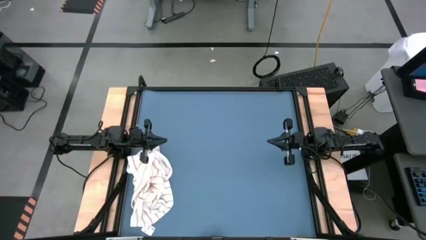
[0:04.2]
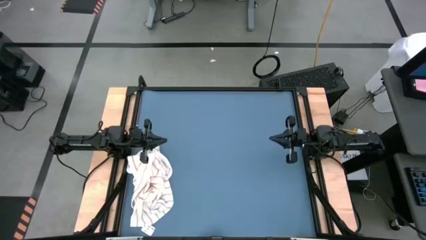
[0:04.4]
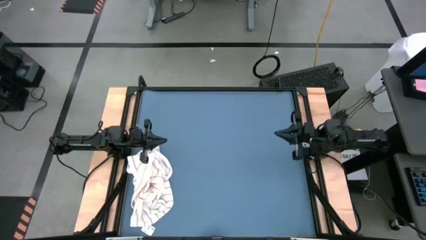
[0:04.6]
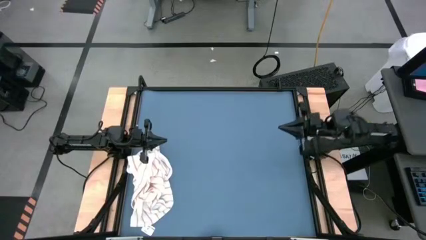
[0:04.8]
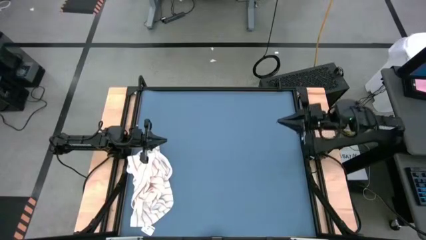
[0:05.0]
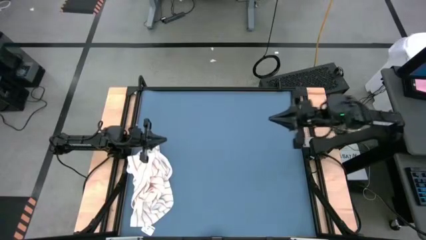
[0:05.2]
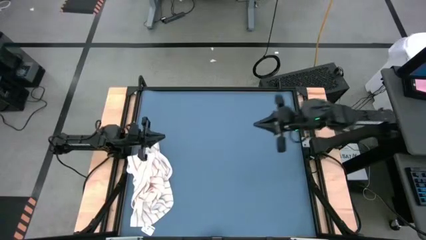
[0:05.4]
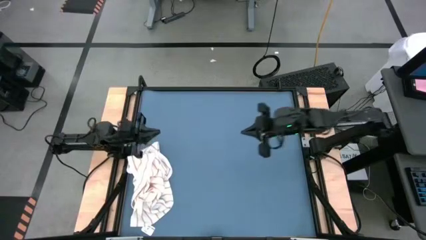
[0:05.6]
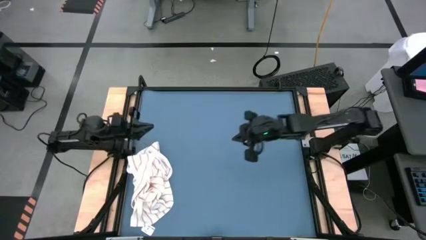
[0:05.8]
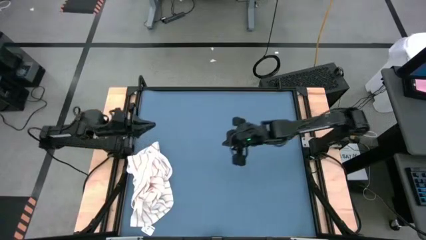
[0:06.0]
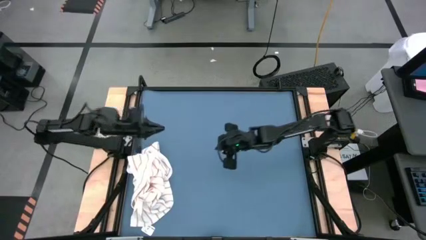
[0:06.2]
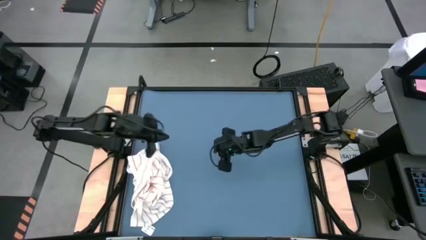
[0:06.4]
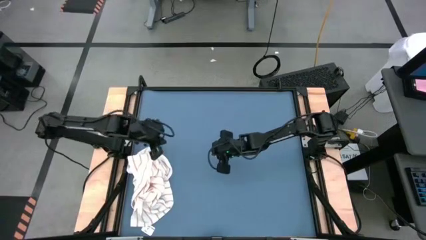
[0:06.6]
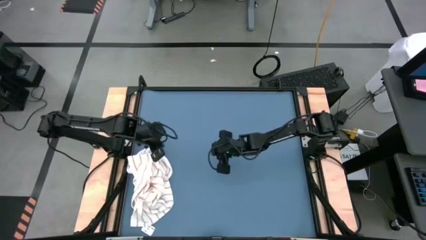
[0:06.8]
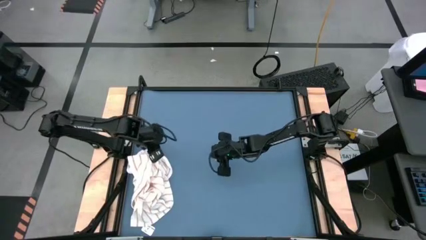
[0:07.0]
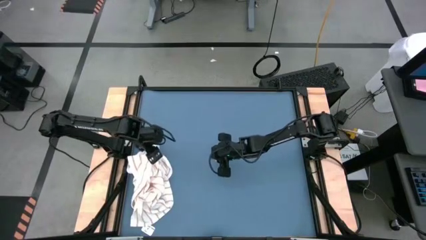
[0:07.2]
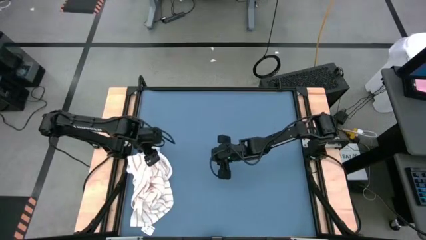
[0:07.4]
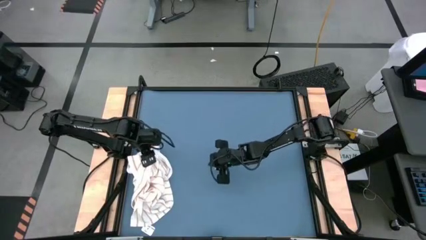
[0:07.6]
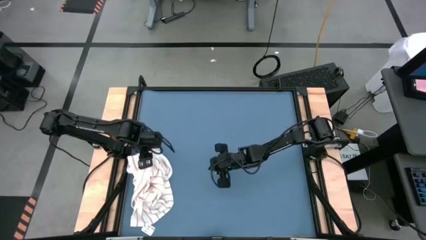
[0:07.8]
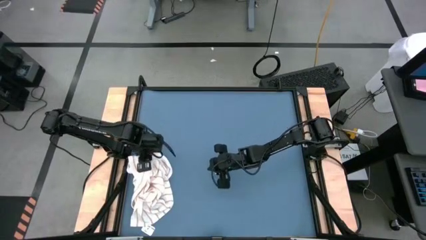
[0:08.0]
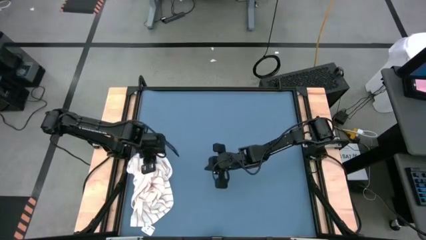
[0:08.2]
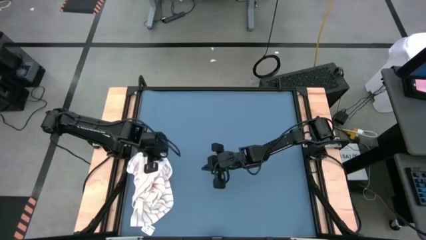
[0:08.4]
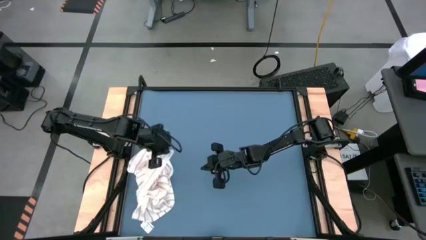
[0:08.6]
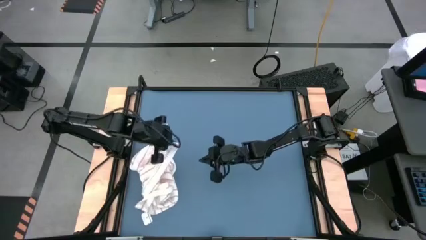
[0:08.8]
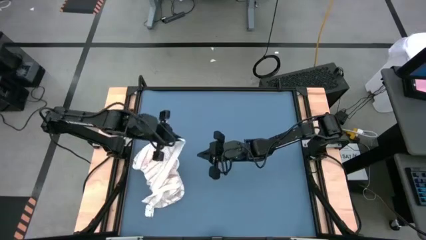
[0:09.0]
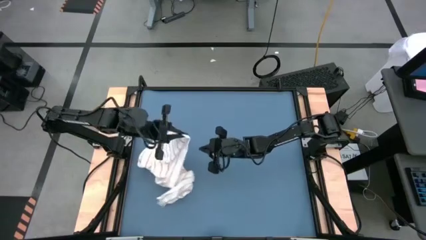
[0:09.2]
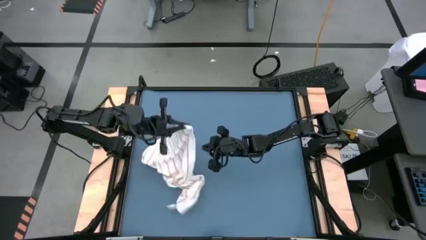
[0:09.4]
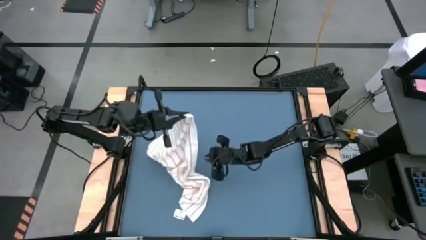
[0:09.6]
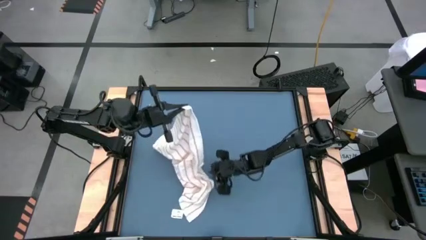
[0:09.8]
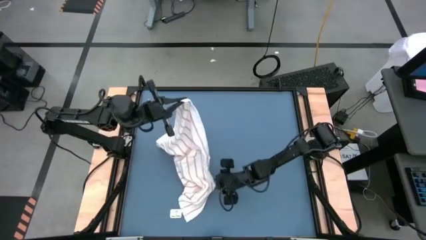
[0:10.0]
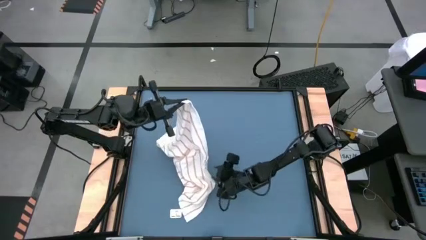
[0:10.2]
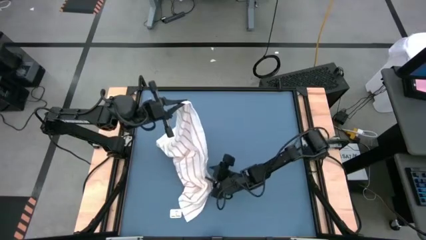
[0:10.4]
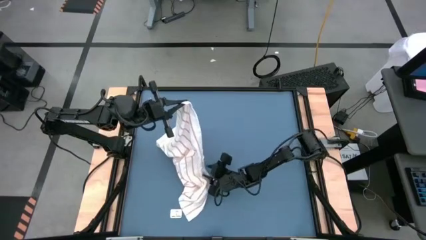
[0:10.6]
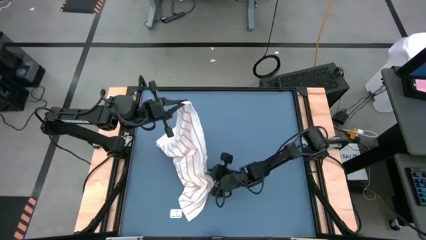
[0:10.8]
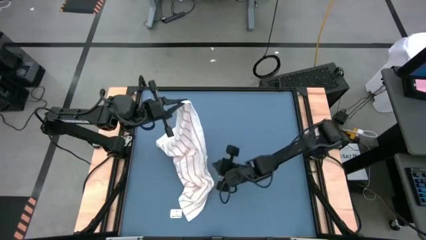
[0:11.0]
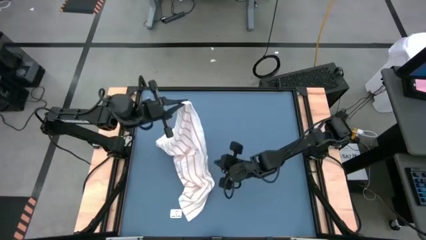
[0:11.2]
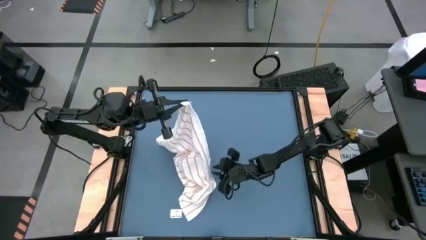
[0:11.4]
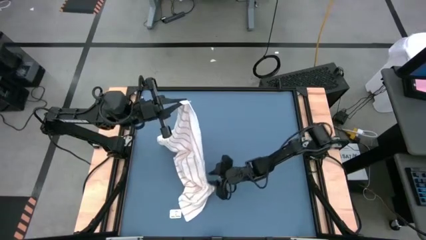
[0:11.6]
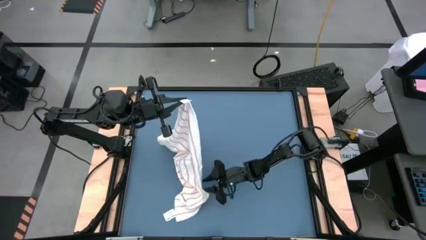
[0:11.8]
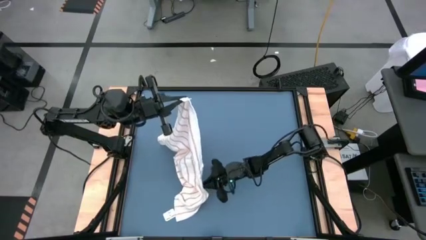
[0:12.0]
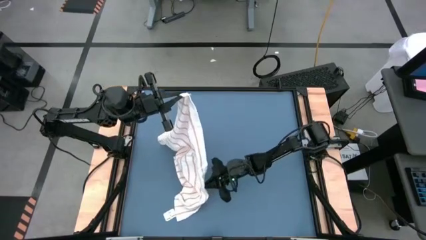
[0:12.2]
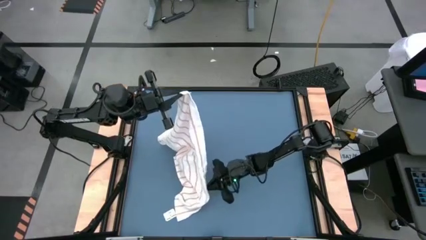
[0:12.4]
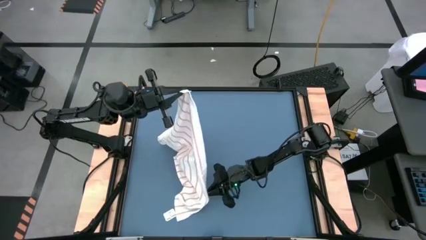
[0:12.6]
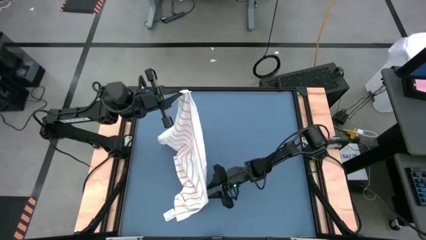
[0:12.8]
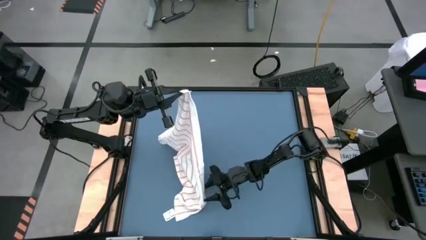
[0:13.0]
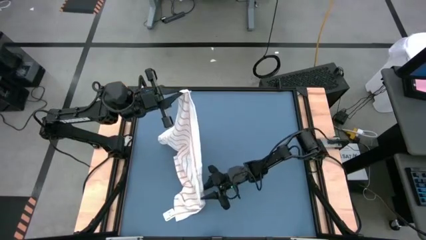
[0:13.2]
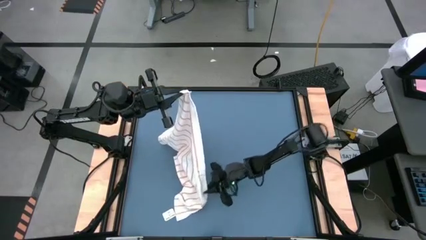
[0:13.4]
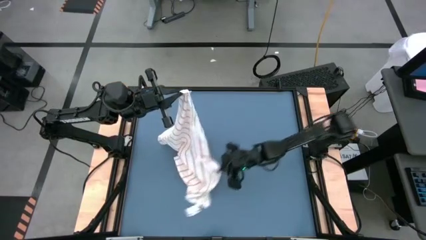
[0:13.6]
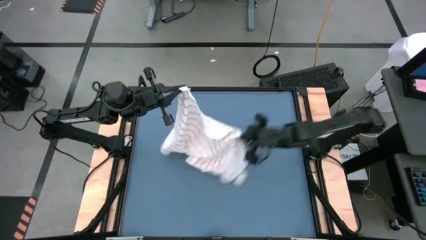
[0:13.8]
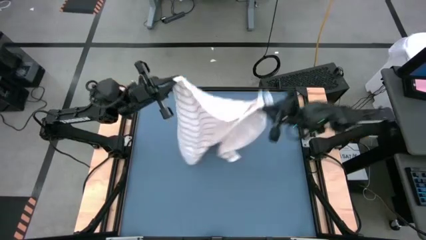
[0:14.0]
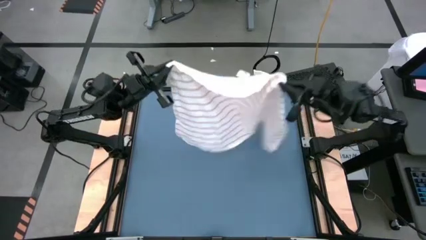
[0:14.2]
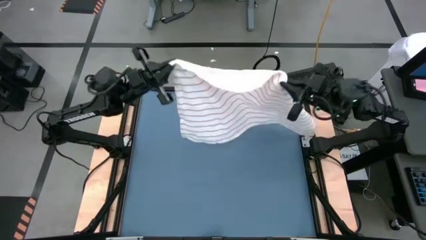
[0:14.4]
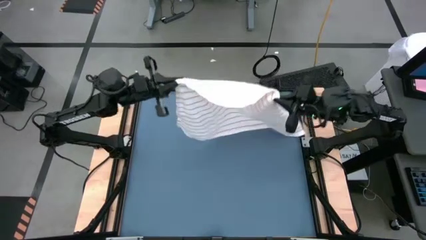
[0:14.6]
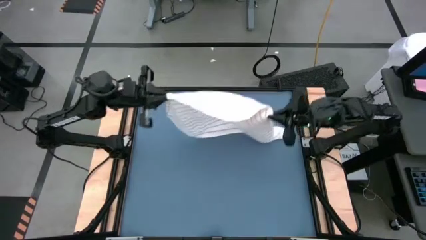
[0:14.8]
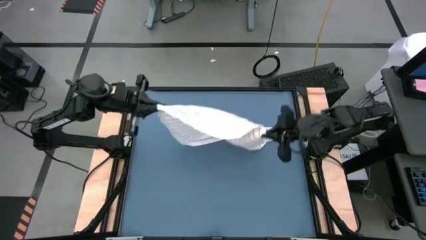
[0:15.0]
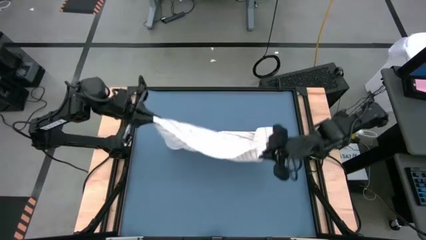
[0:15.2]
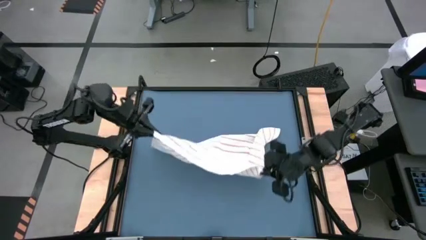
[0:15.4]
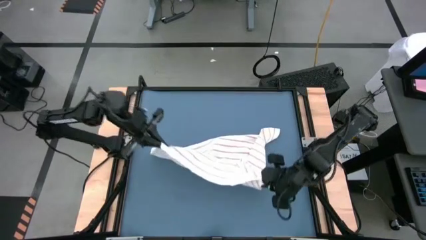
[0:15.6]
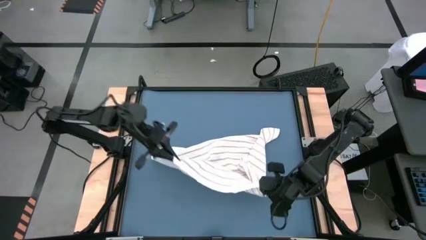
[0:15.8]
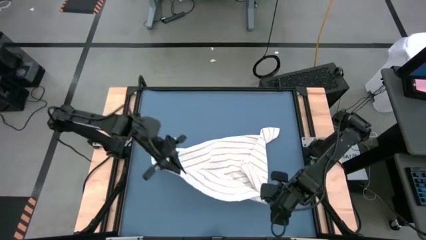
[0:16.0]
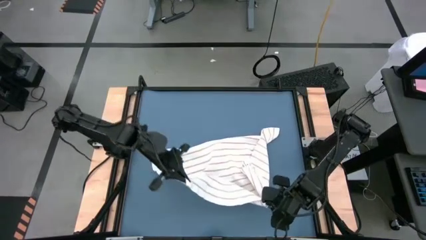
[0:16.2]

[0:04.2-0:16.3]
Task: Roll towel
Fold the white towel

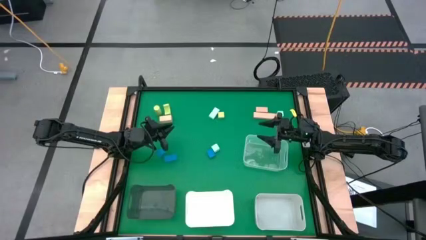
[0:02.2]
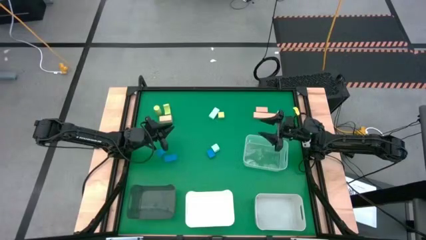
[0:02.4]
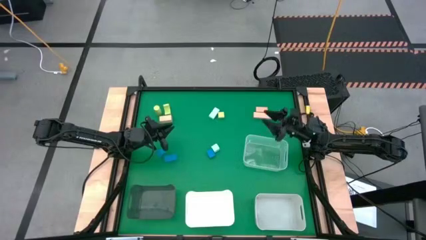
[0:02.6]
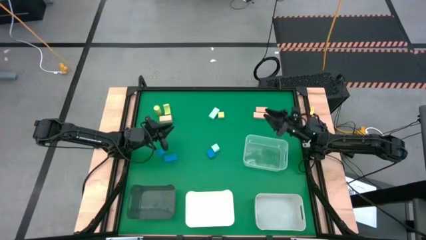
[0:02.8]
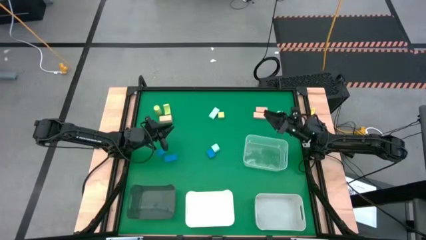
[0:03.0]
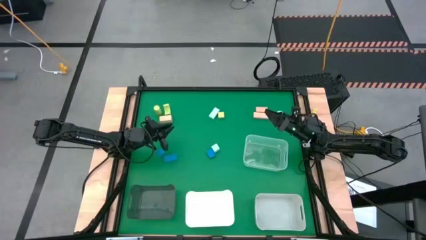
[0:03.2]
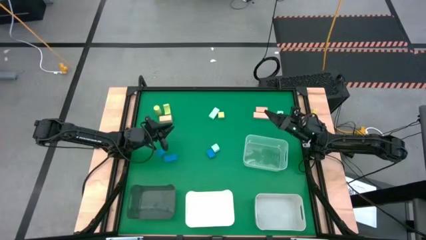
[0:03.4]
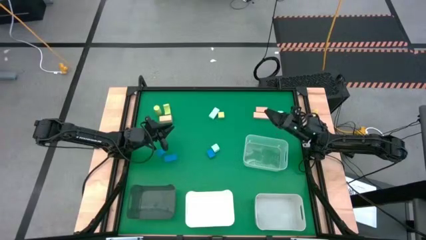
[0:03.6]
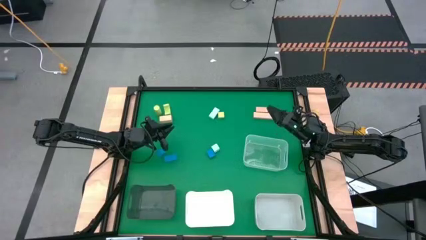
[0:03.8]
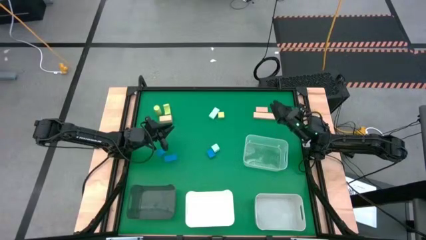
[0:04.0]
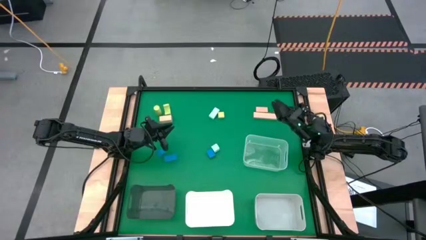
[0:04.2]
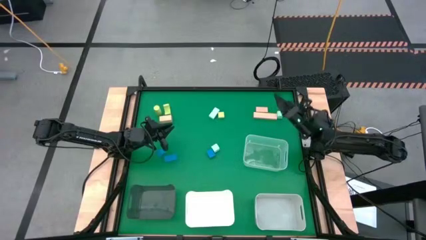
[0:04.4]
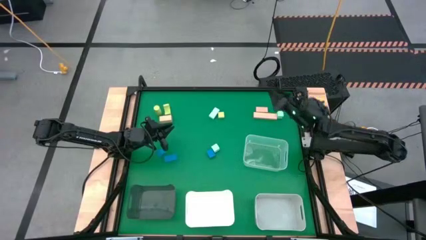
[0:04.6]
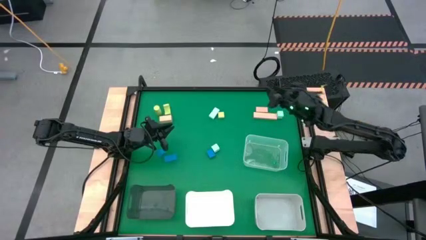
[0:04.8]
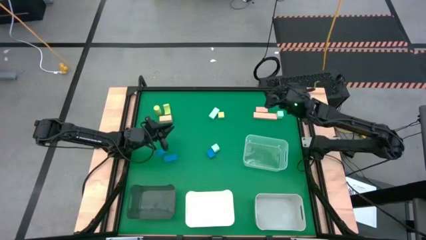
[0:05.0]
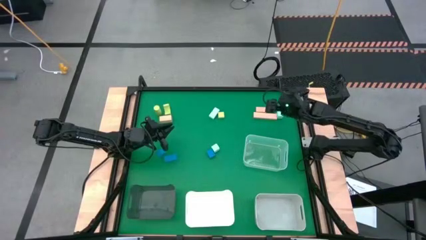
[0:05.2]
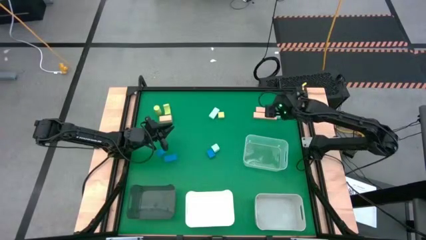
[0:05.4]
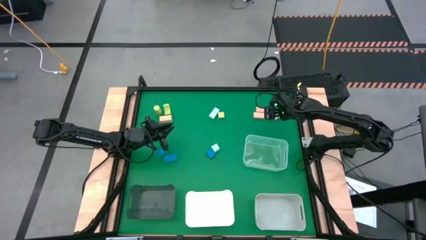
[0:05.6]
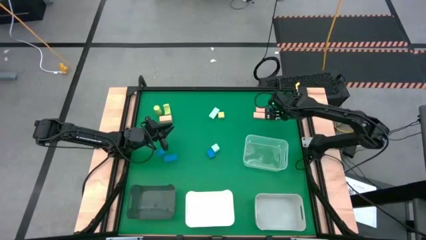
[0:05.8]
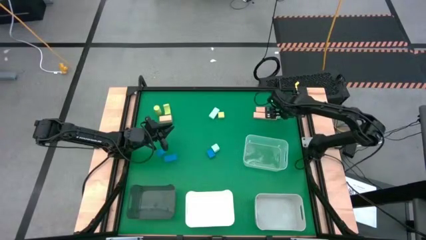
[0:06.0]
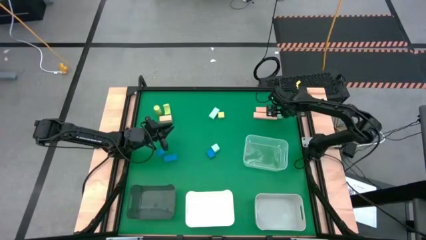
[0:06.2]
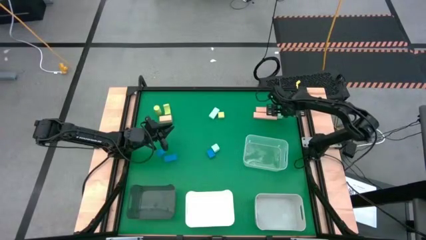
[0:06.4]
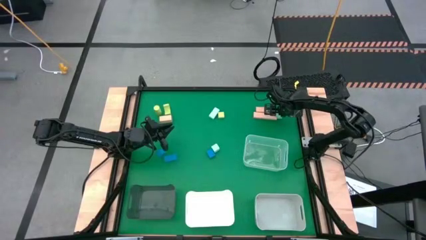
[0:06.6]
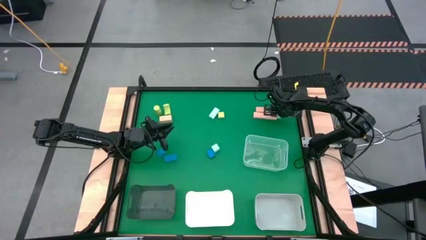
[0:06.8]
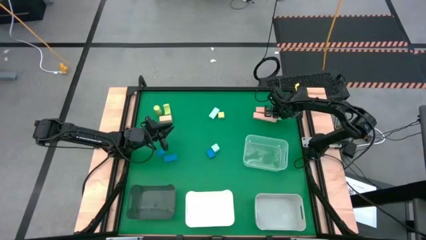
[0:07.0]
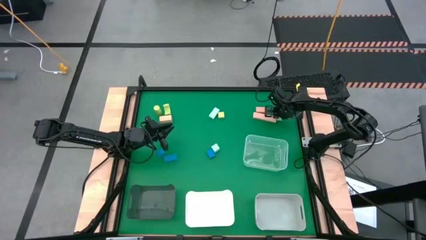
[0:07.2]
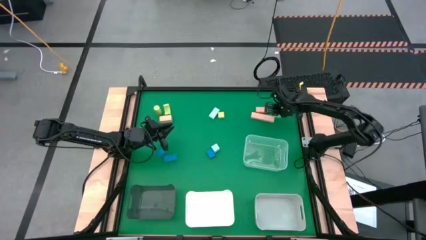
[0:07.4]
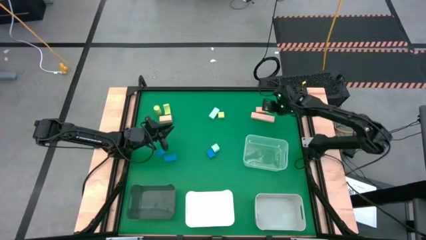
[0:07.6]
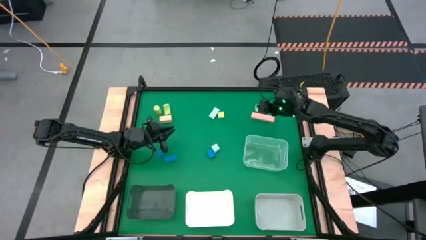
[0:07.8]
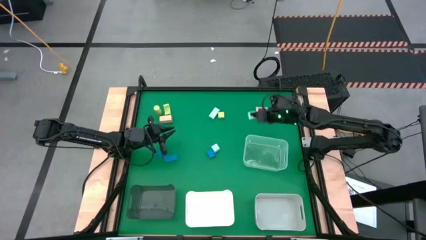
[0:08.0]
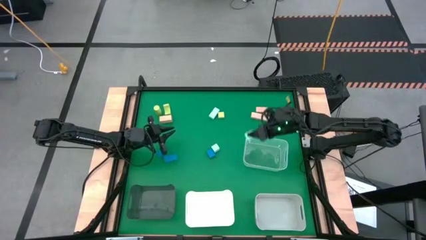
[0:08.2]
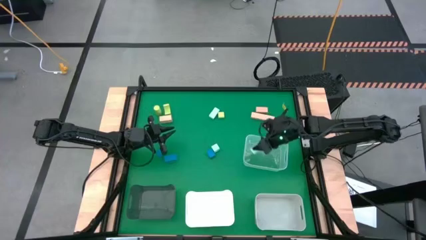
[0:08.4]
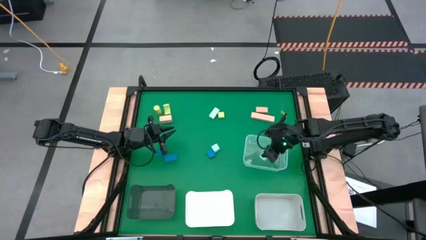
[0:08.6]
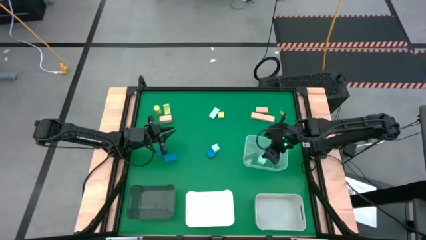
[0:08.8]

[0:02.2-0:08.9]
Task: Sort & place blocks by color
Put the top right light blue block into the transparent bin
